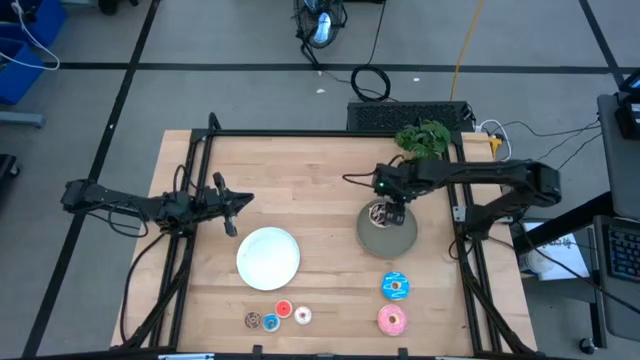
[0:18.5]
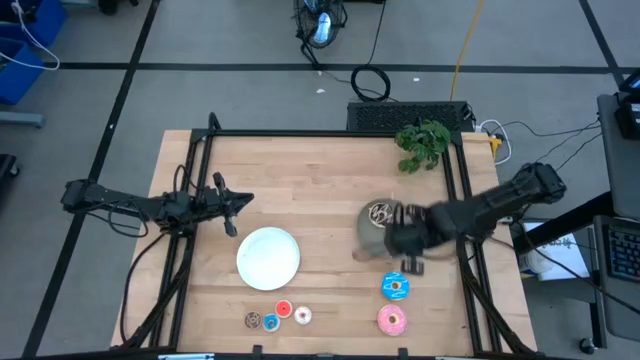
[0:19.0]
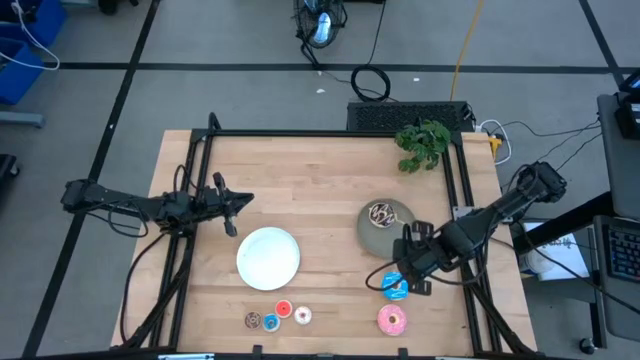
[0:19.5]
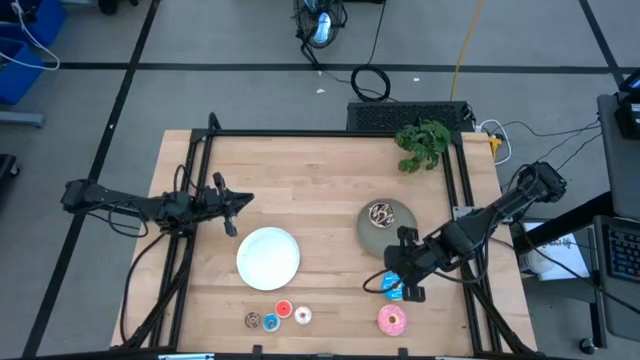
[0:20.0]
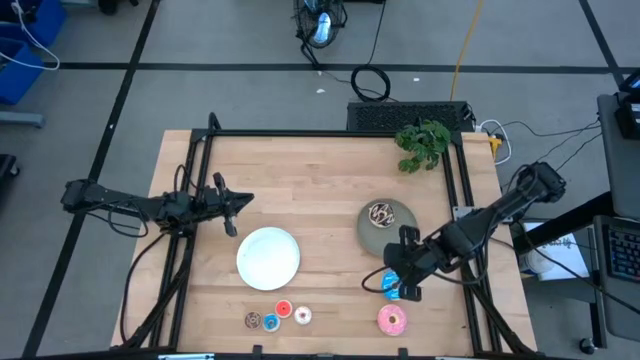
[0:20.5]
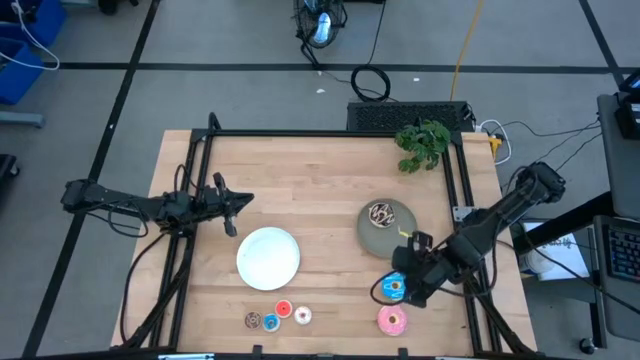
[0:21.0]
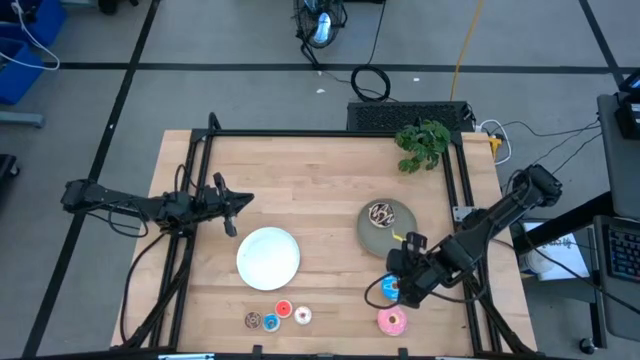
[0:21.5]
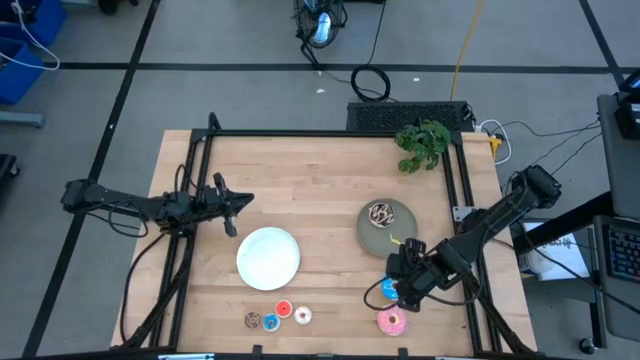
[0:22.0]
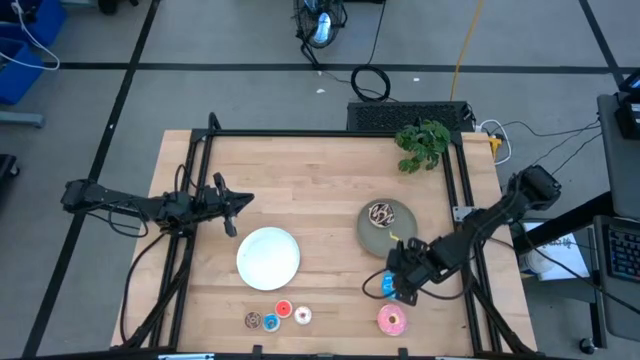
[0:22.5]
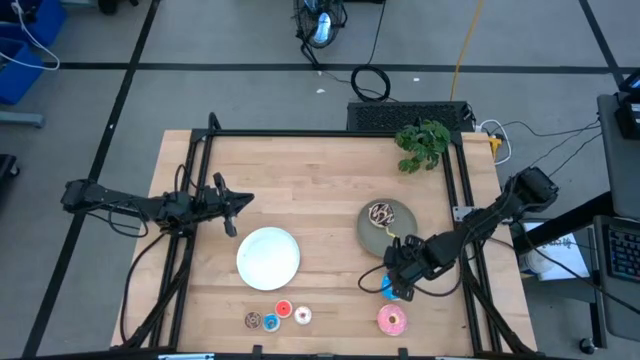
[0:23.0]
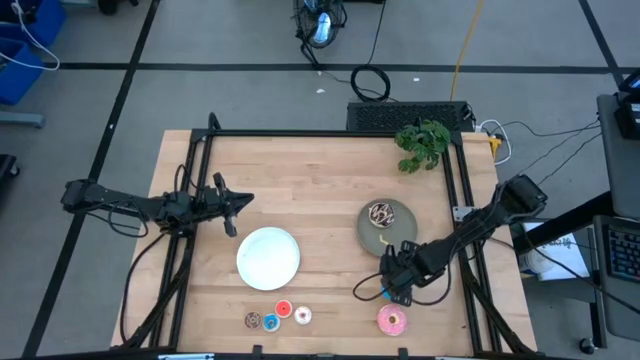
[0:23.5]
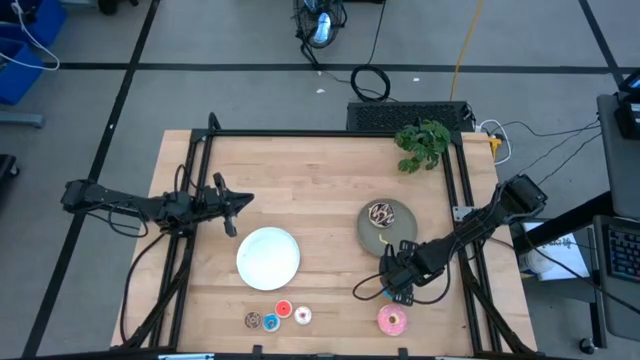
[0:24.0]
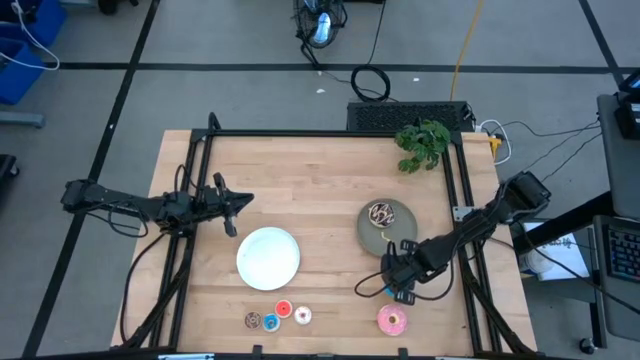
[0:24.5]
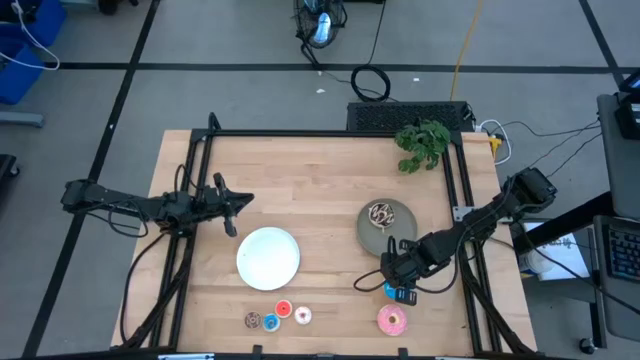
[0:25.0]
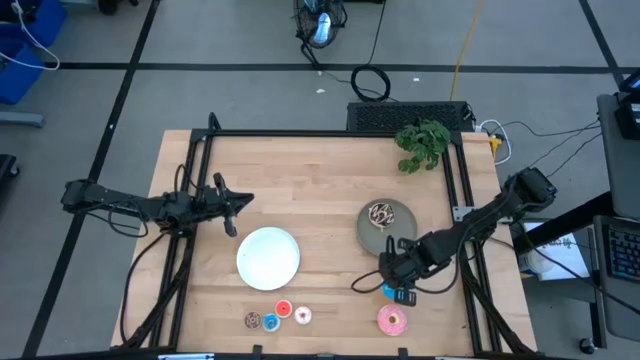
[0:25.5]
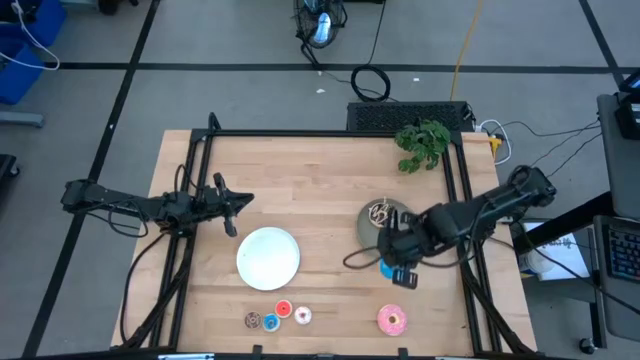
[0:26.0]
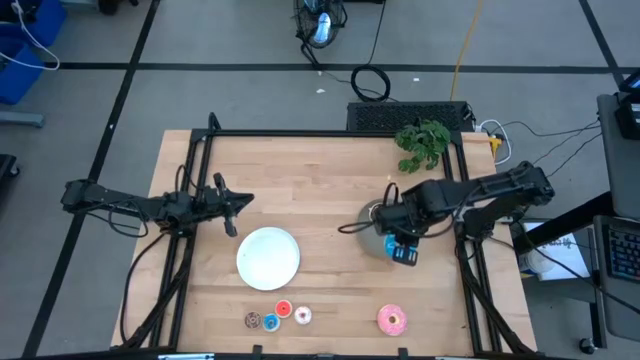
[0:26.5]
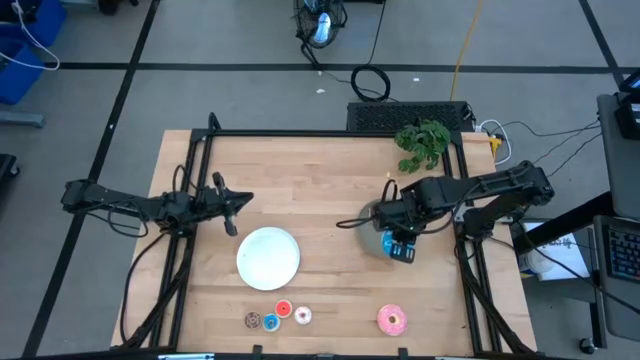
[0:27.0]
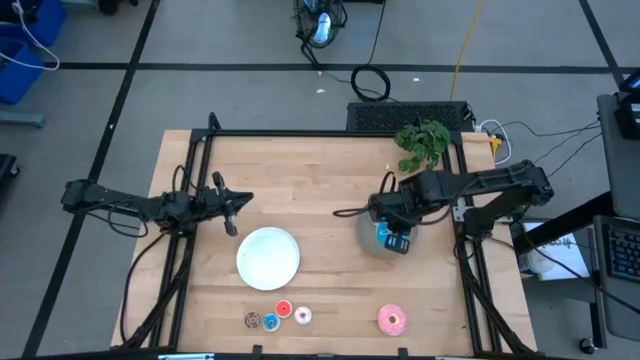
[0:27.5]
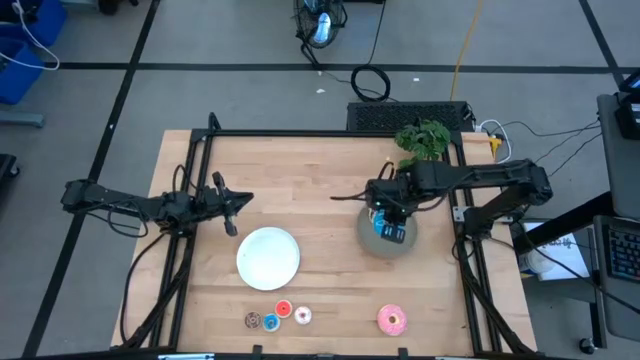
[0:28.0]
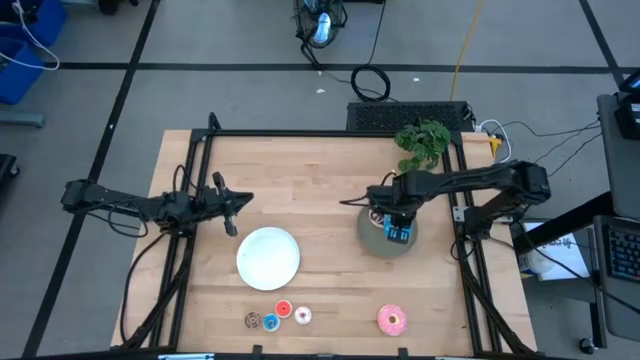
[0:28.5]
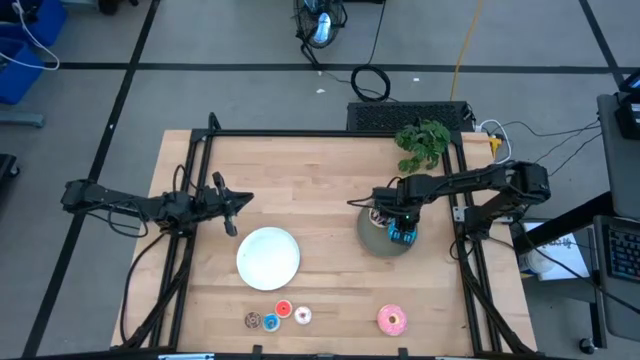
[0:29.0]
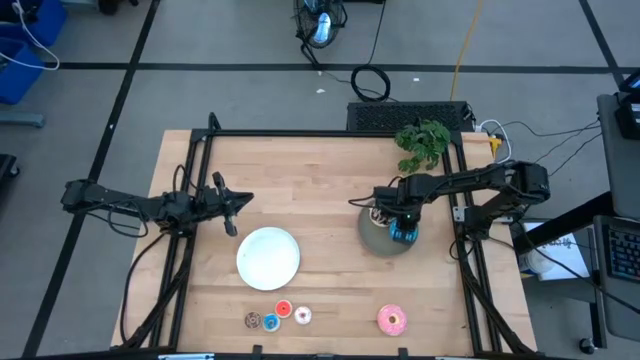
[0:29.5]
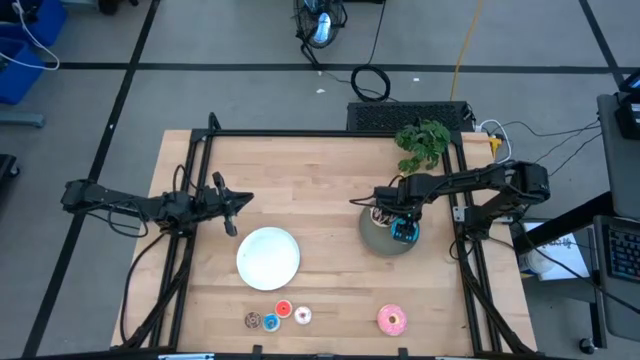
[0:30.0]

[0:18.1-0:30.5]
Task: Pick & Place donuts
Put the large blue donut on the gray plate

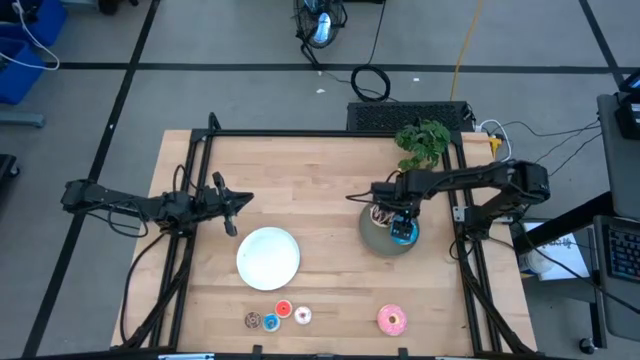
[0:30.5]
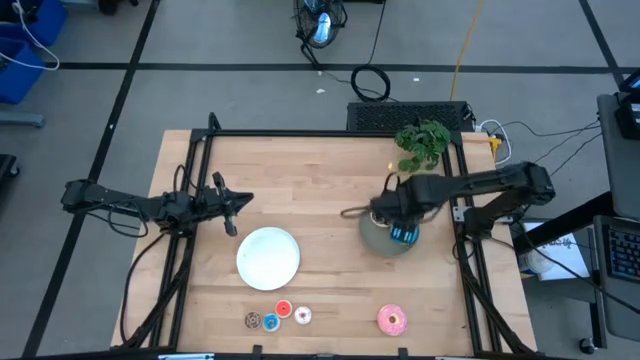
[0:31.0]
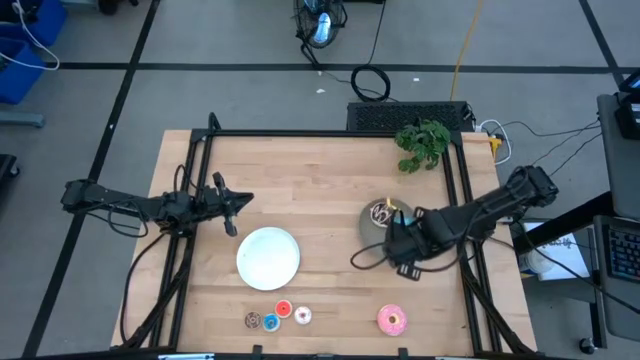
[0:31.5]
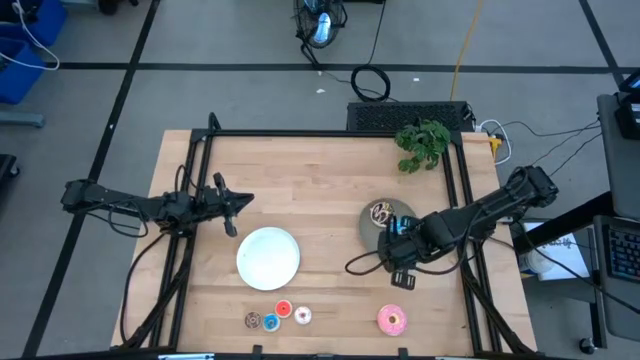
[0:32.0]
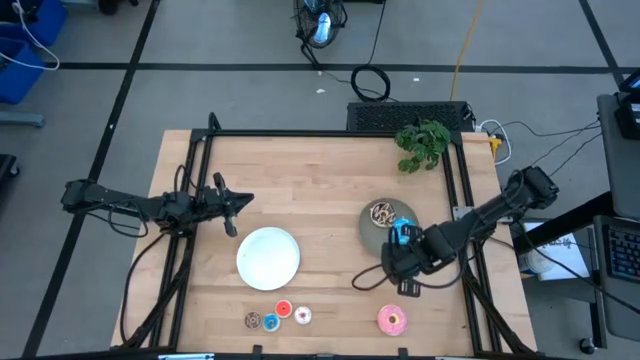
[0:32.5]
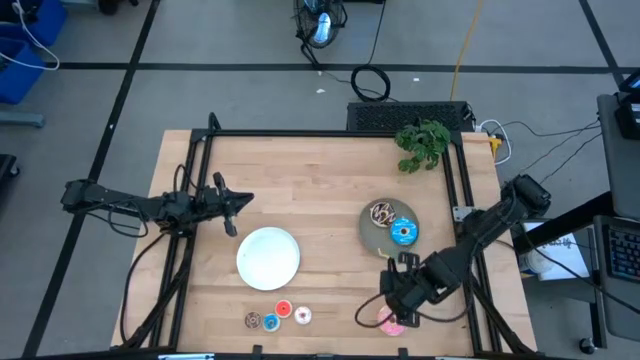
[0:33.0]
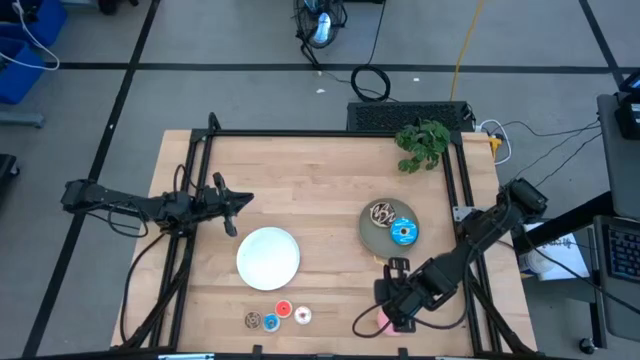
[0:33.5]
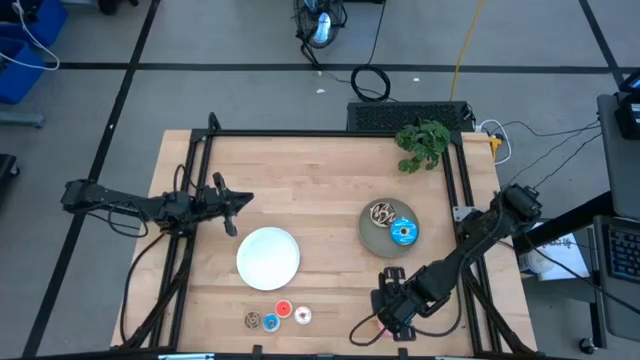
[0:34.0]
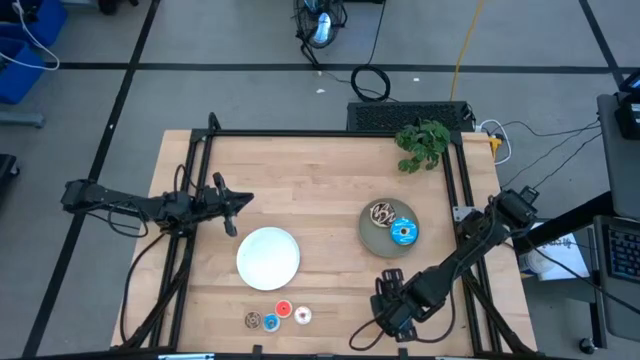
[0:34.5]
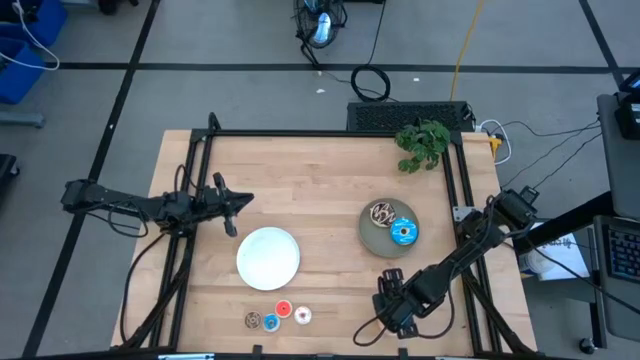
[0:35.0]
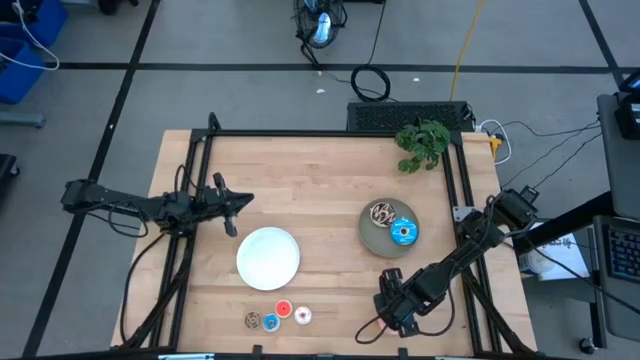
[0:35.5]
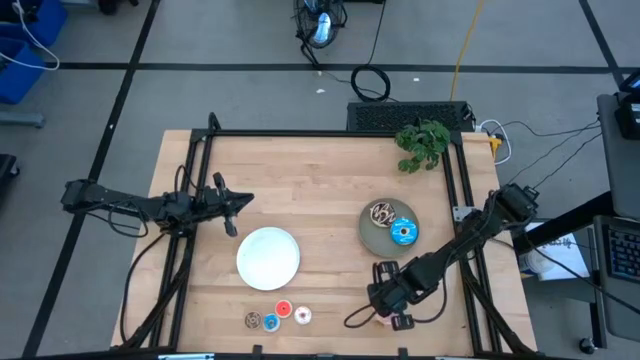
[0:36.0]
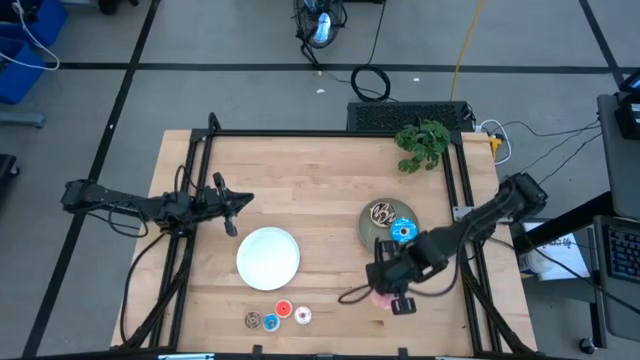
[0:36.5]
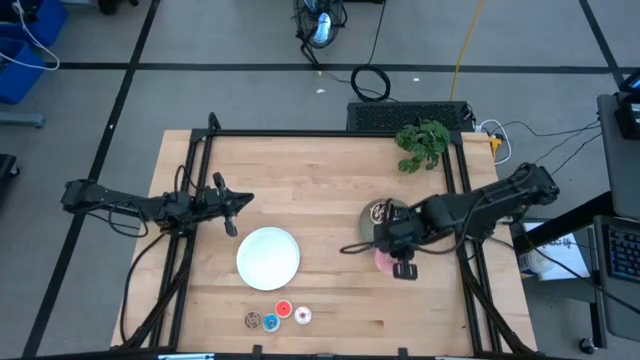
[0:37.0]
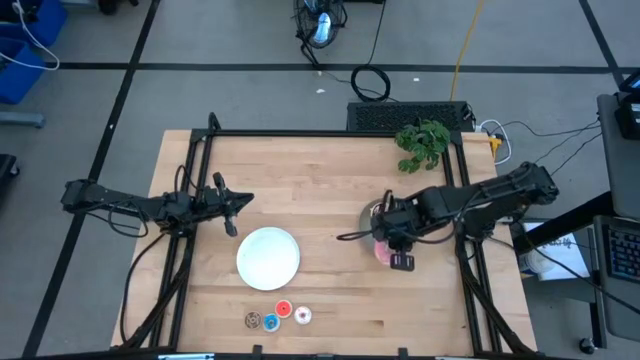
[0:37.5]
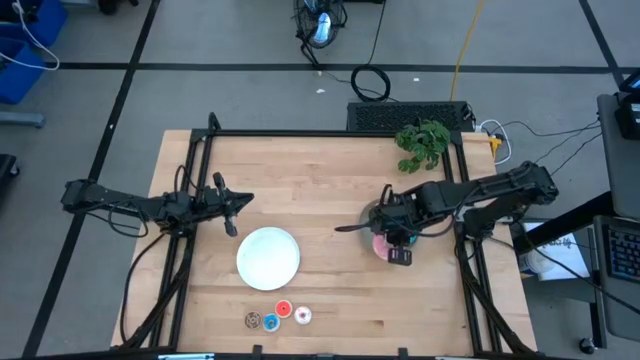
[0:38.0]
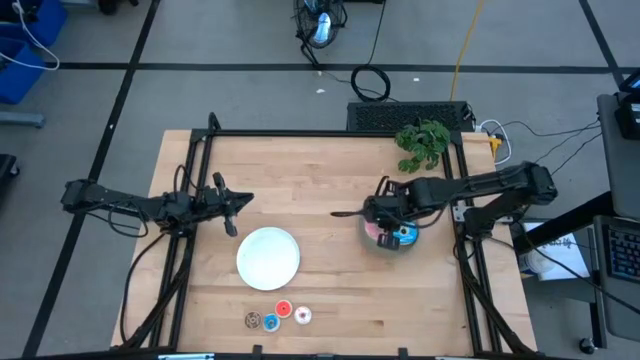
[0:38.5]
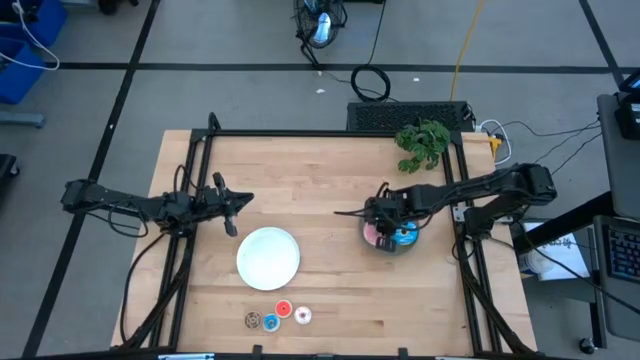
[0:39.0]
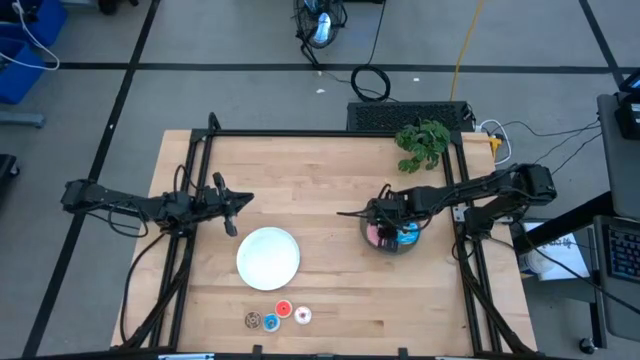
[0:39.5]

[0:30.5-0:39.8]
Put the large pink donut on the gray plate
